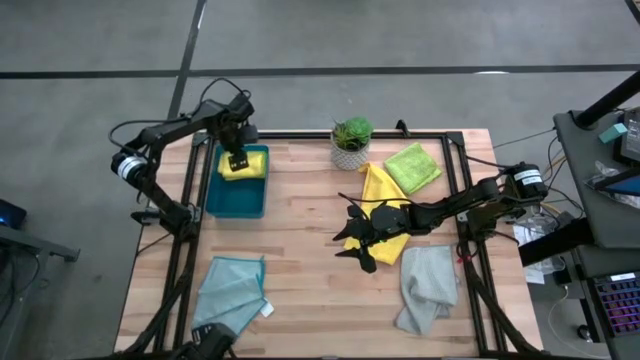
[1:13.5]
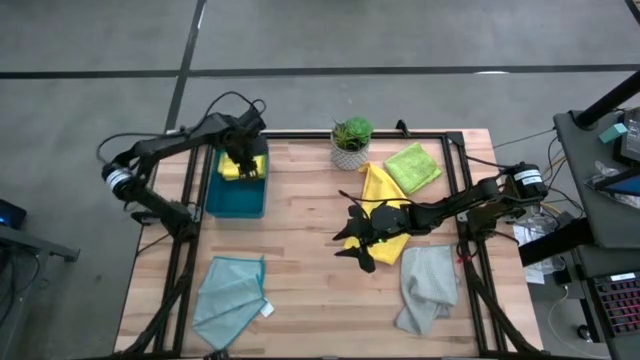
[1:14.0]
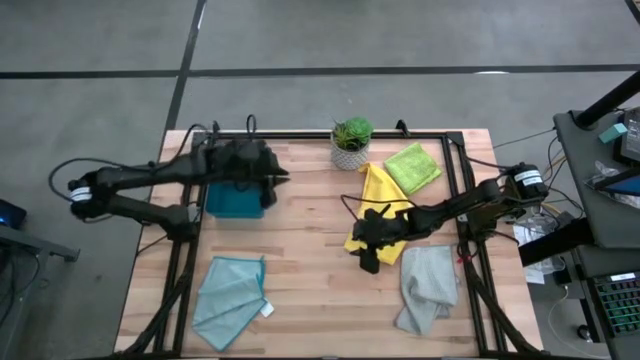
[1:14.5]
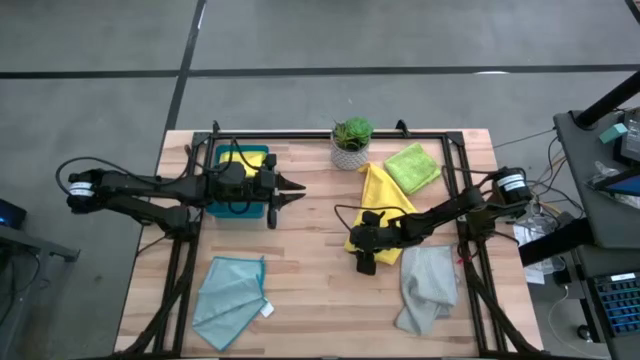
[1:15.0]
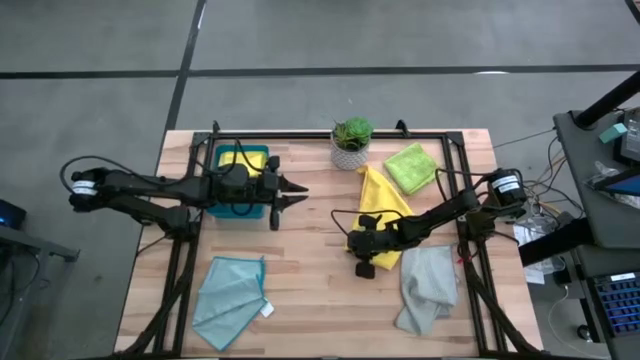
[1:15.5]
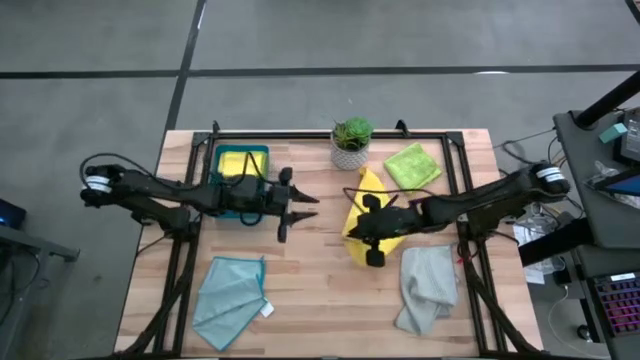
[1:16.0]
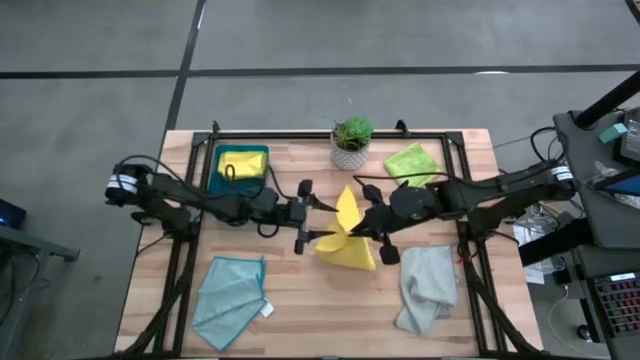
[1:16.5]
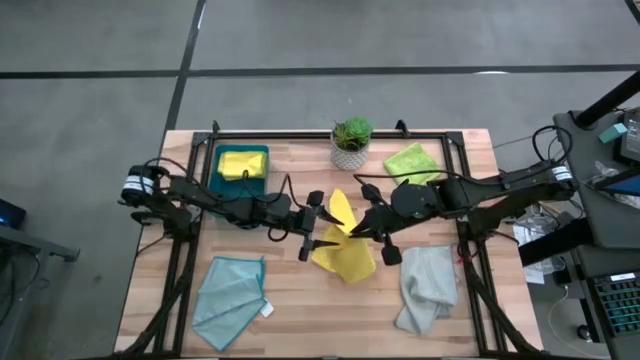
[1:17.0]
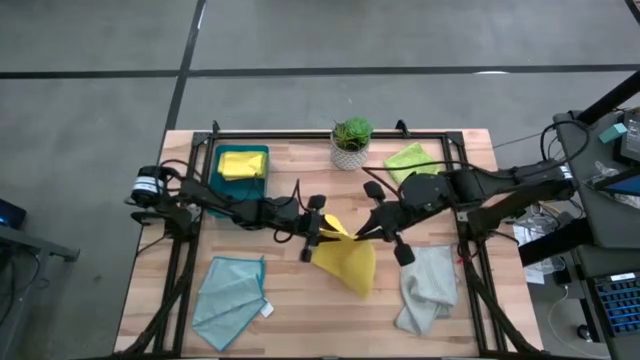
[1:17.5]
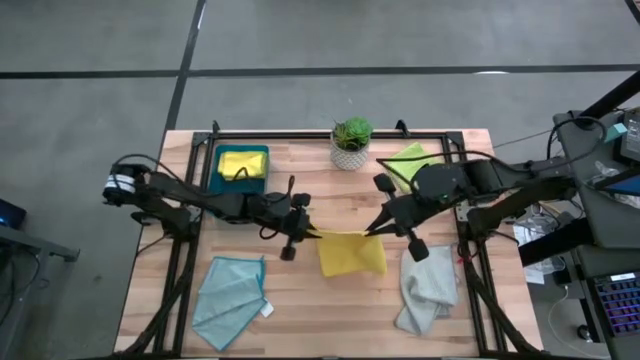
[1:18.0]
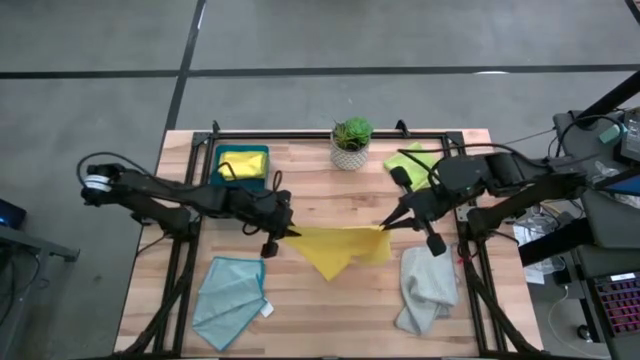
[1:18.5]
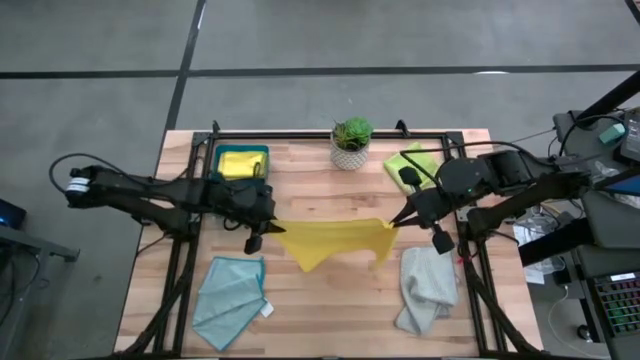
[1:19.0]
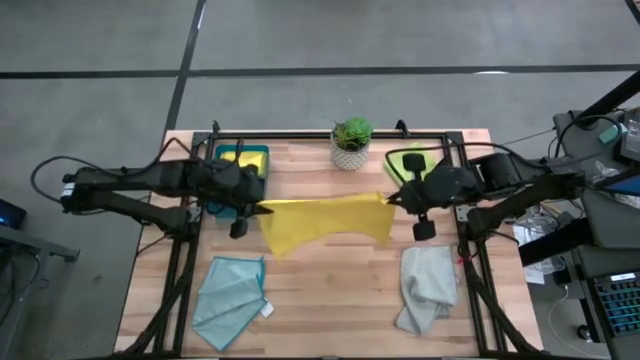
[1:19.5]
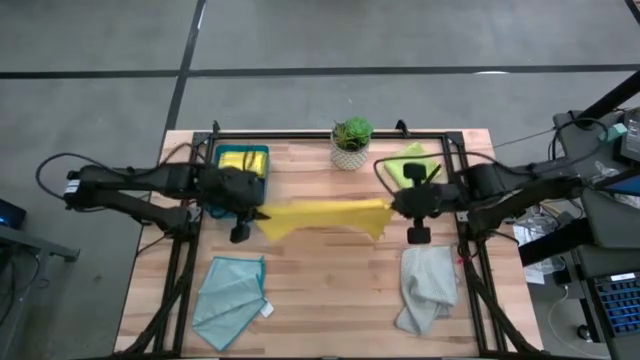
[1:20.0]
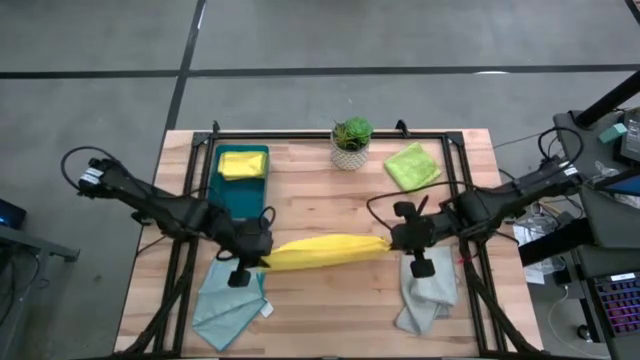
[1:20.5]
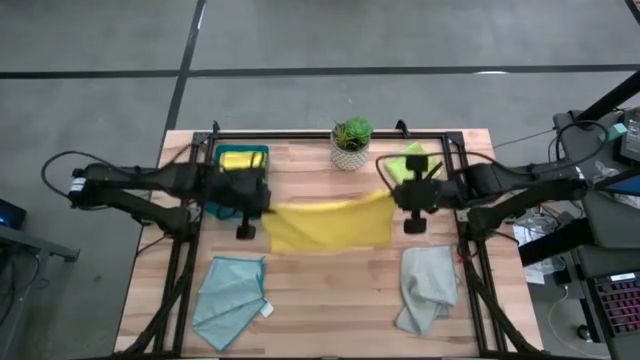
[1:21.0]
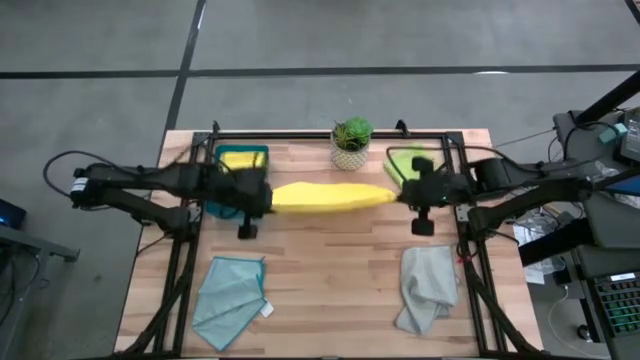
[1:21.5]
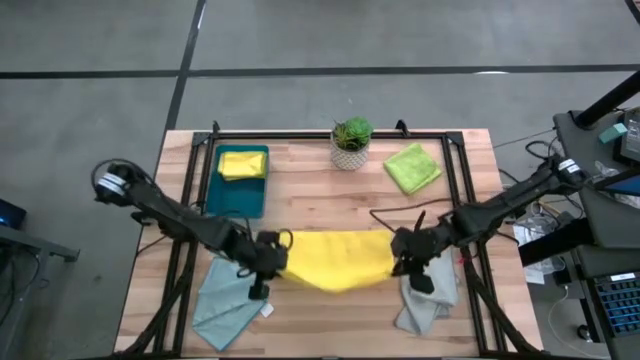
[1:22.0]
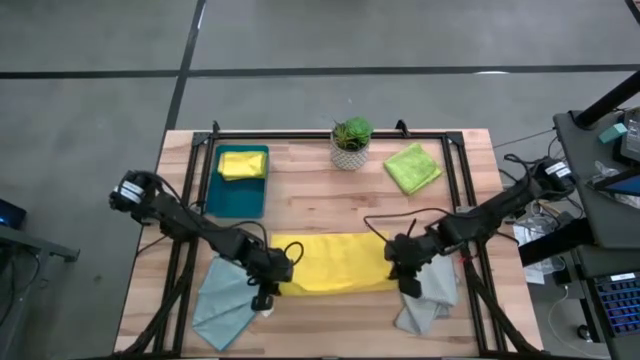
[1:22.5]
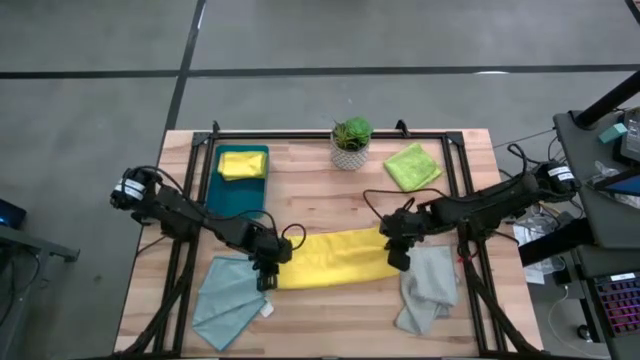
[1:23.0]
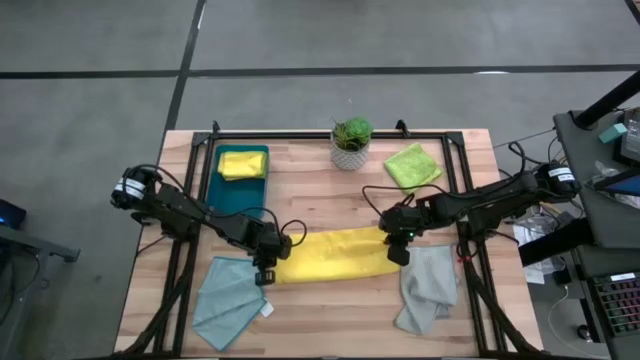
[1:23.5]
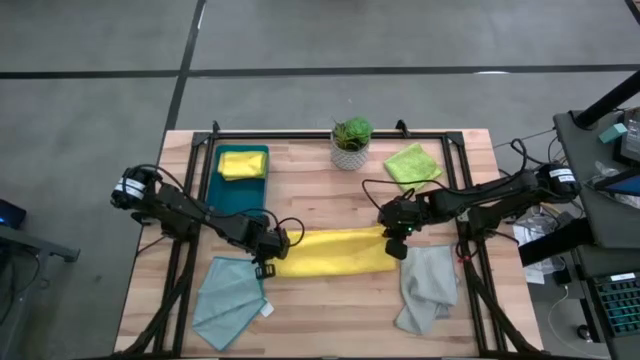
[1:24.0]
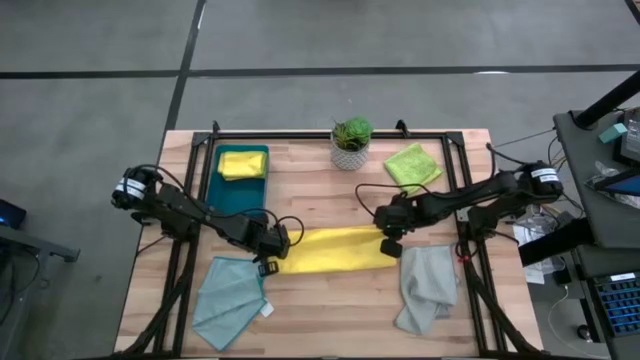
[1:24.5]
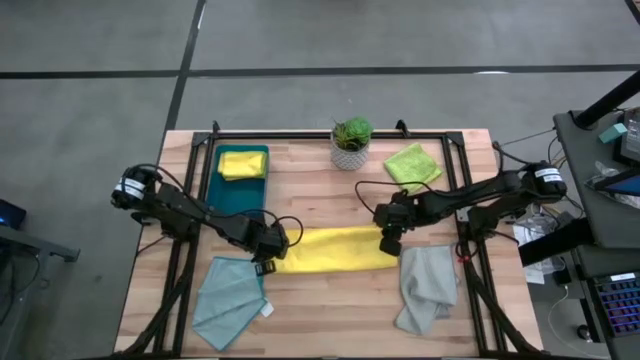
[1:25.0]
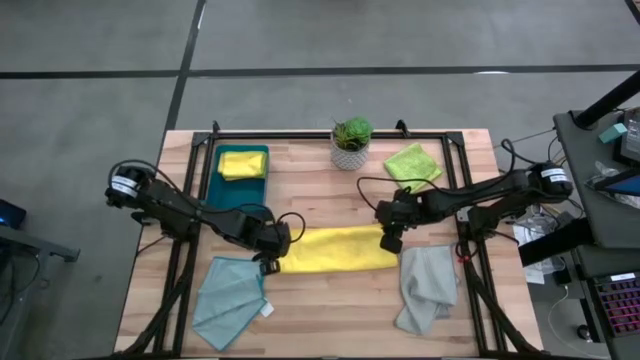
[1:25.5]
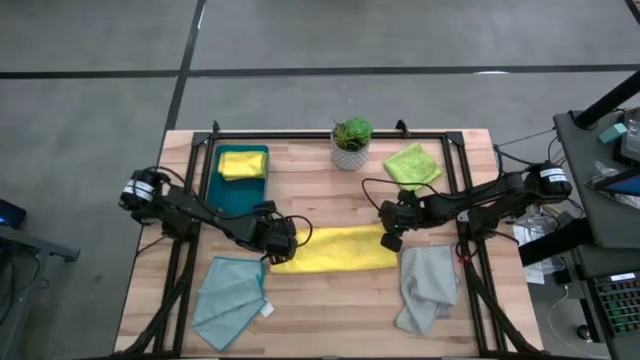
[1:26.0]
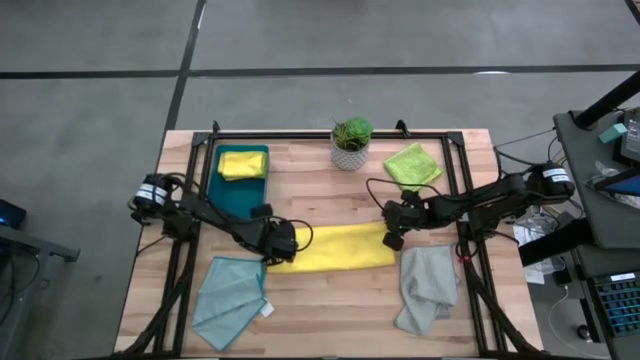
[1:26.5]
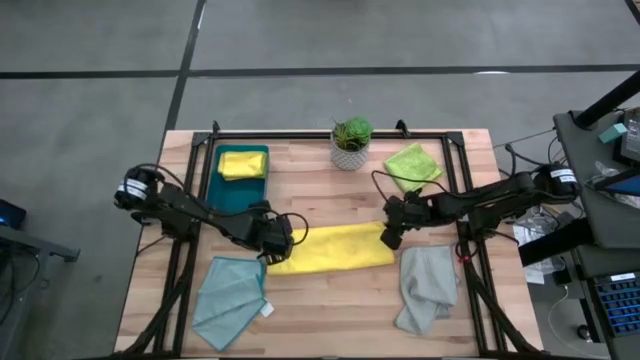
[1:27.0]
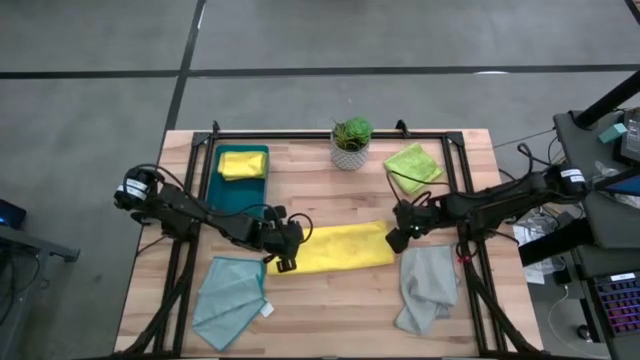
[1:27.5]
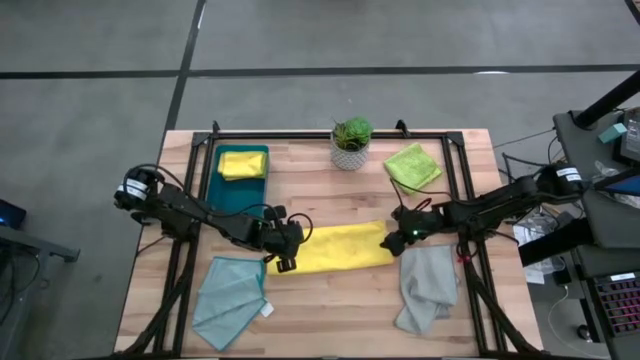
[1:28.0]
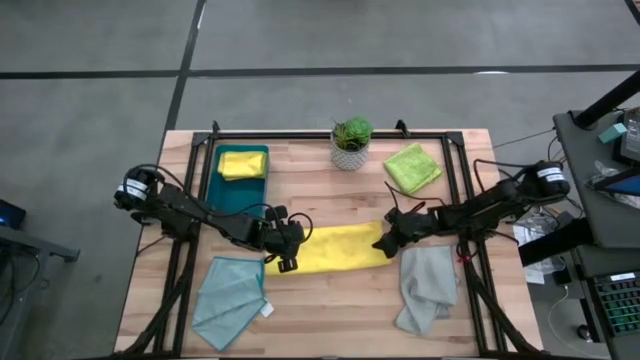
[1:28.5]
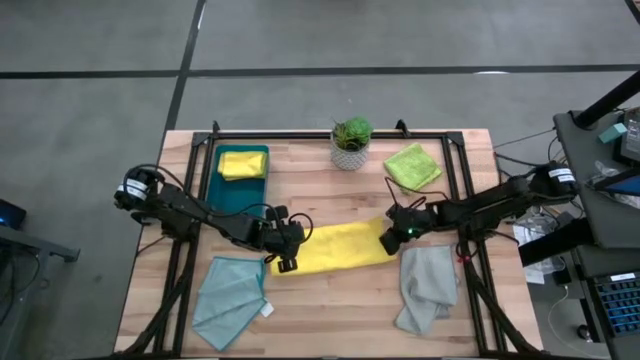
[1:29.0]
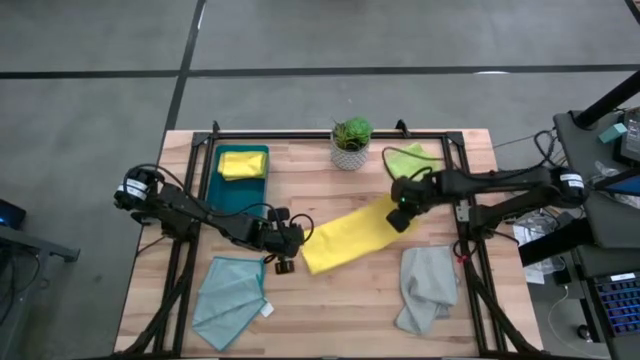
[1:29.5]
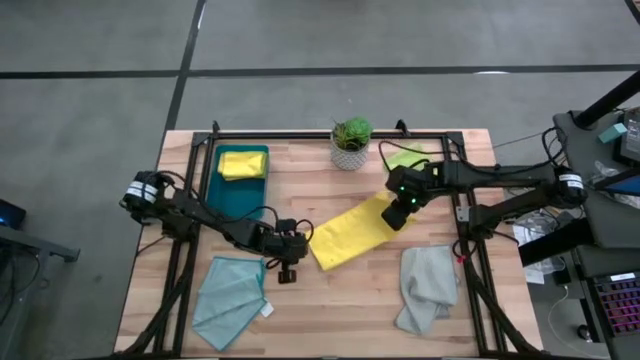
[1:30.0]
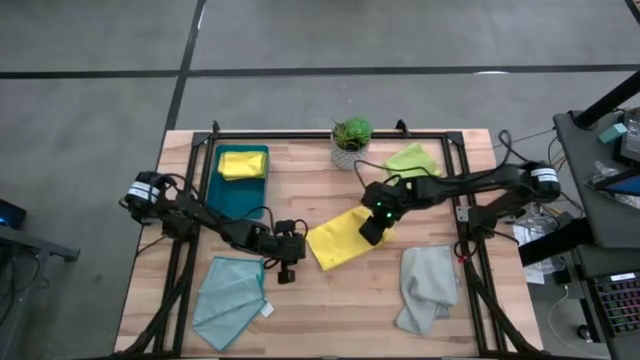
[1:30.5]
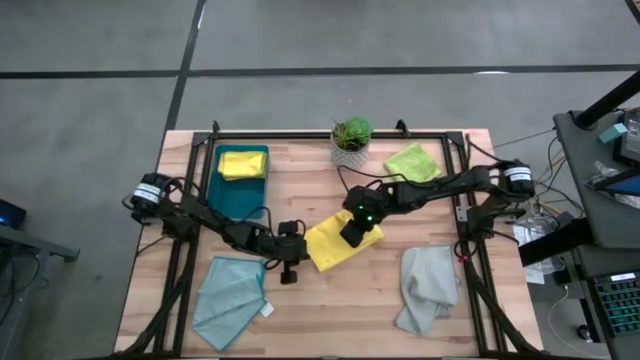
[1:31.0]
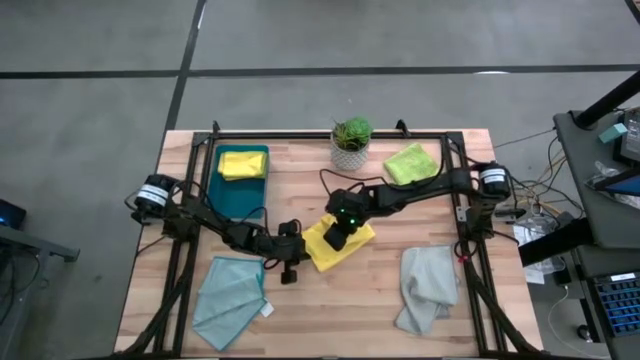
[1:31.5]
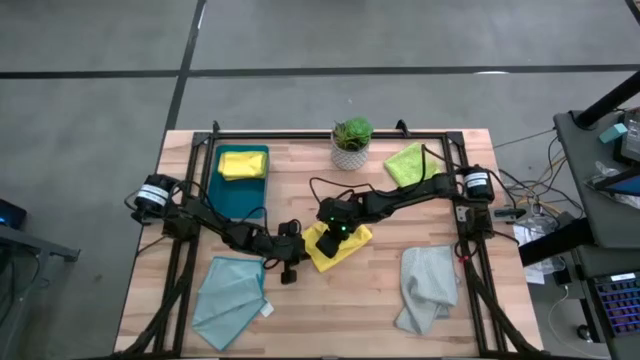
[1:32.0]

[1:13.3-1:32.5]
Task: Fold microfiber towels
Fold the yellow towel

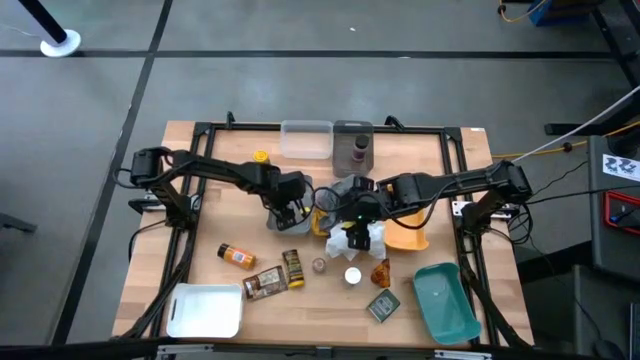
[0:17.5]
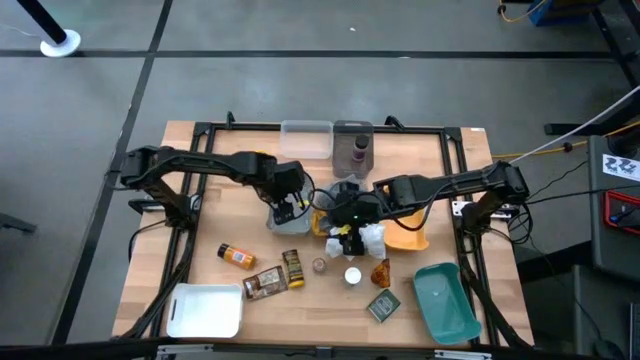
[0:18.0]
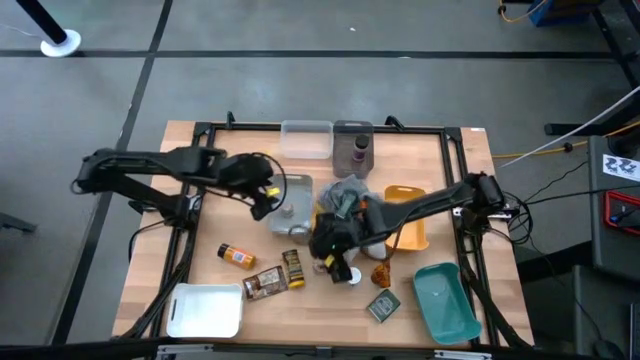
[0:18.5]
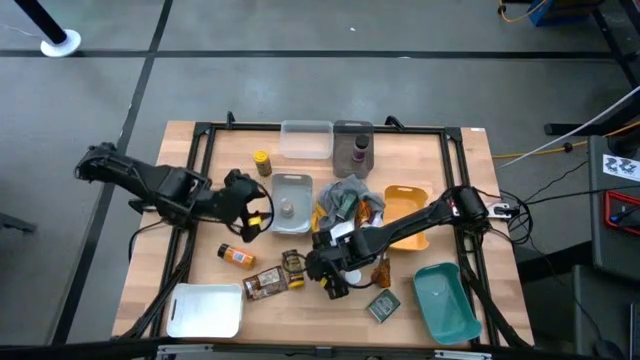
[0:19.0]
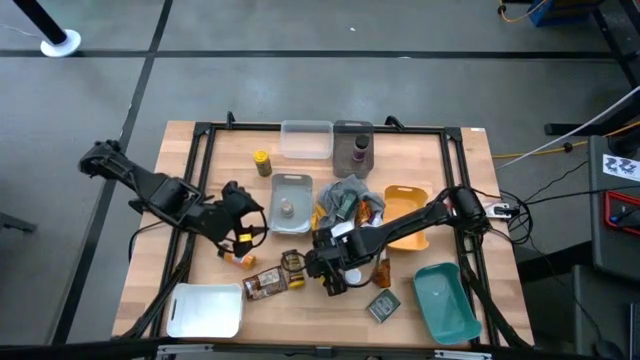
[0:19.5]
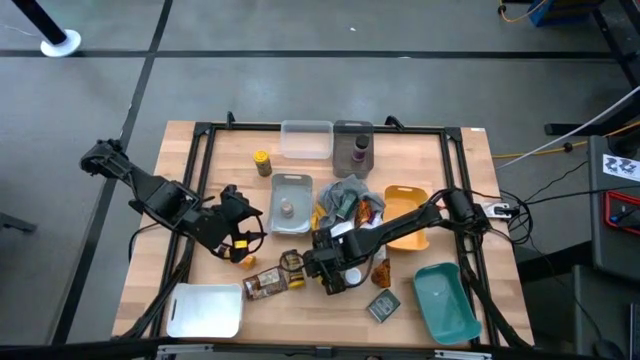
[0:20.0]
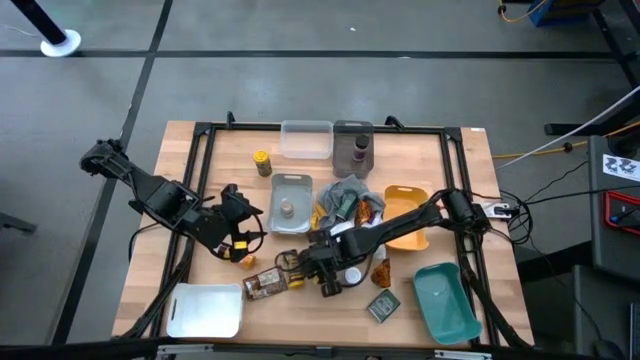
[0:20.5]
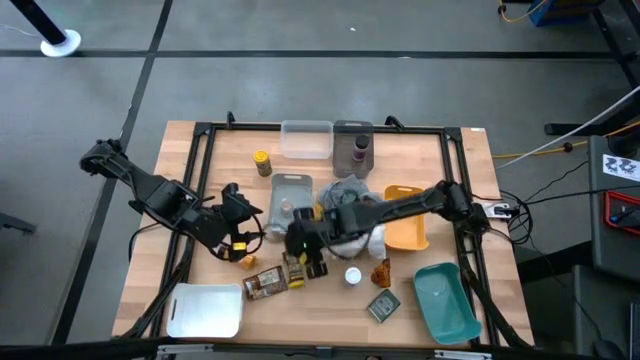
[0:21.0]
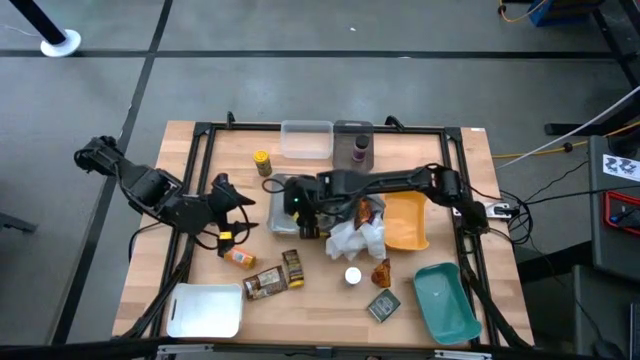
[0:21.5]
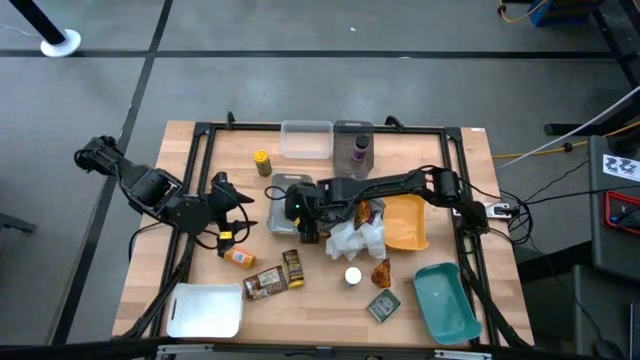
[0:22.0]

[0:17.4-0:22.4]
Task: Sort spices by type
Put the brown seasoning bottle into the gray bin
